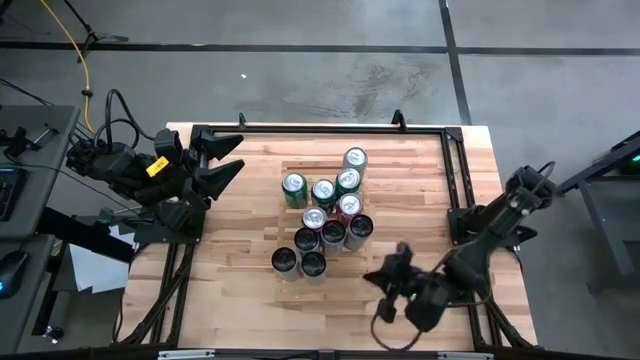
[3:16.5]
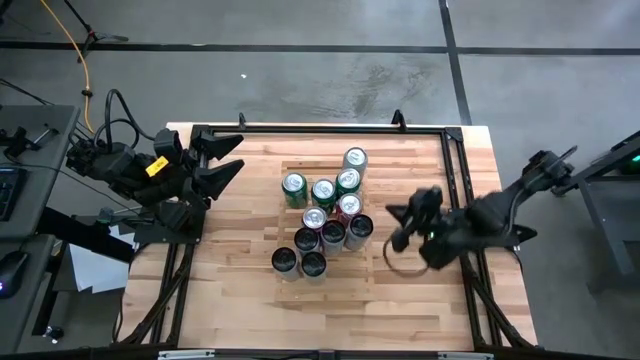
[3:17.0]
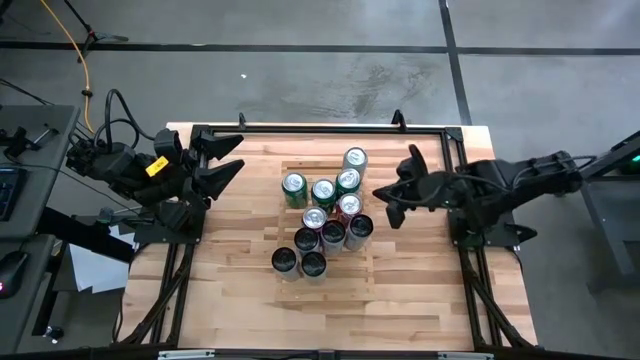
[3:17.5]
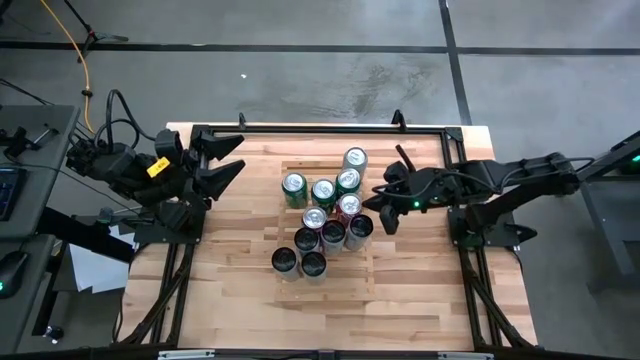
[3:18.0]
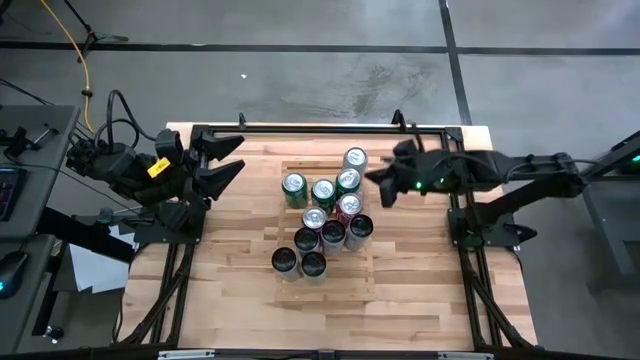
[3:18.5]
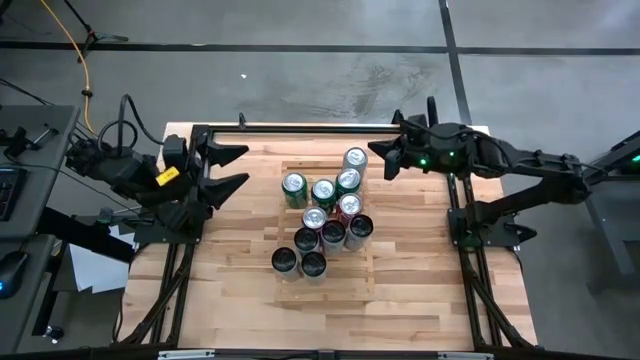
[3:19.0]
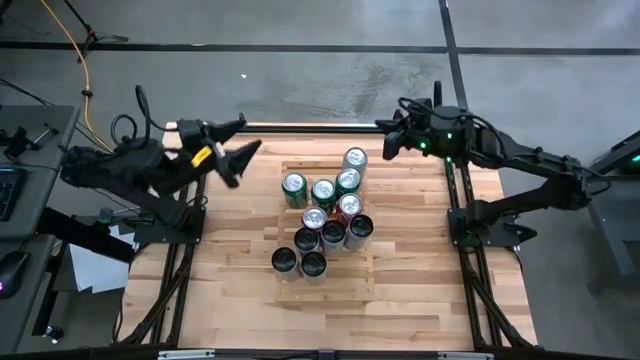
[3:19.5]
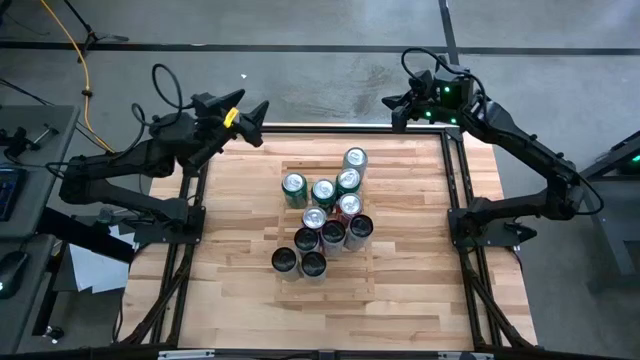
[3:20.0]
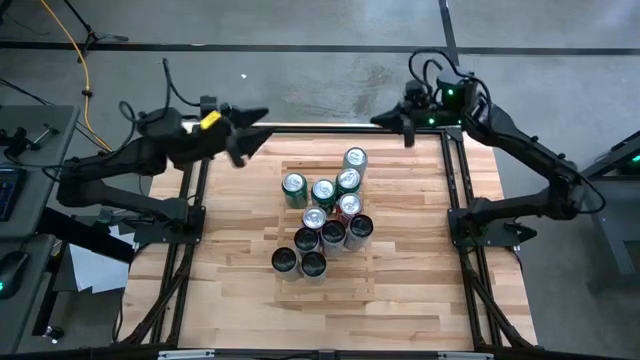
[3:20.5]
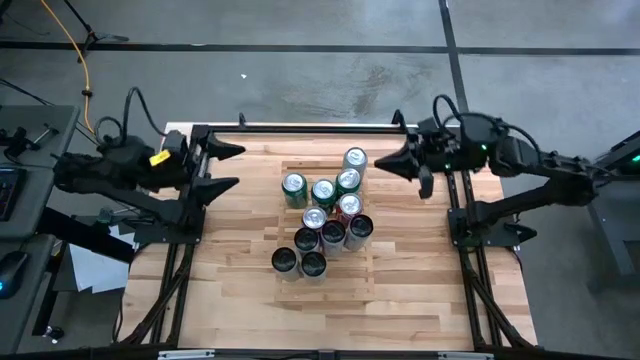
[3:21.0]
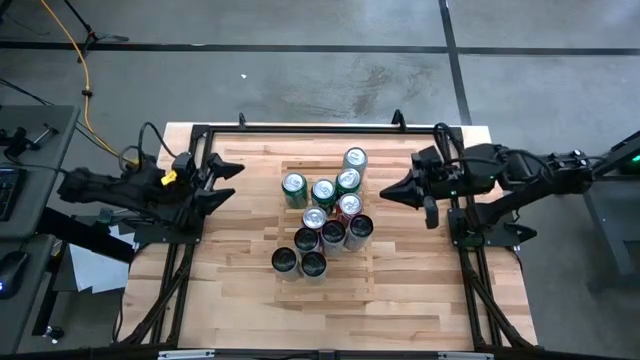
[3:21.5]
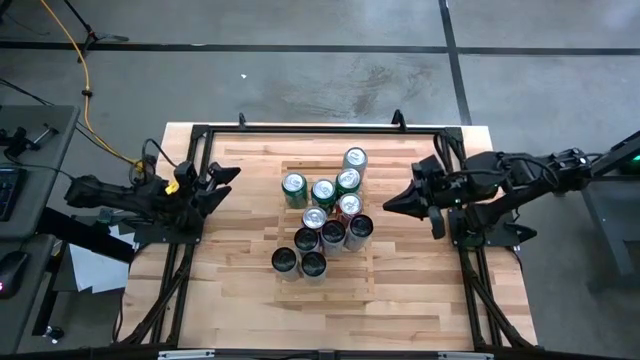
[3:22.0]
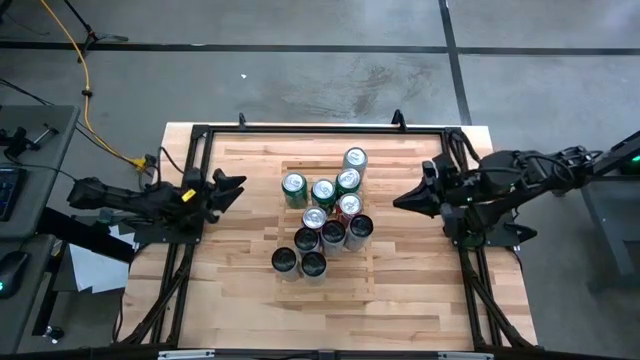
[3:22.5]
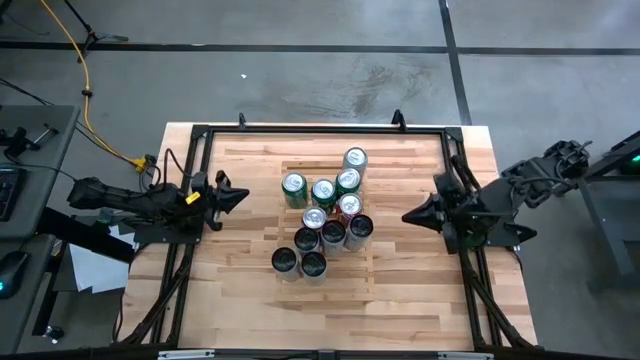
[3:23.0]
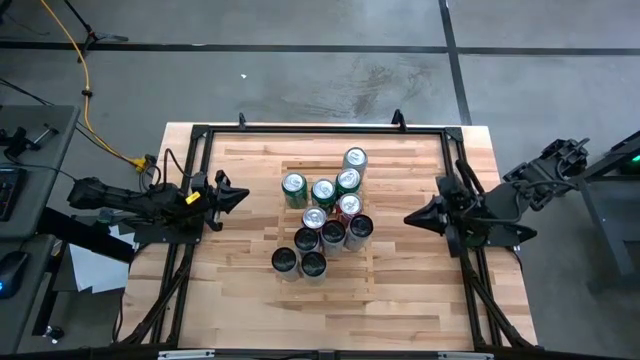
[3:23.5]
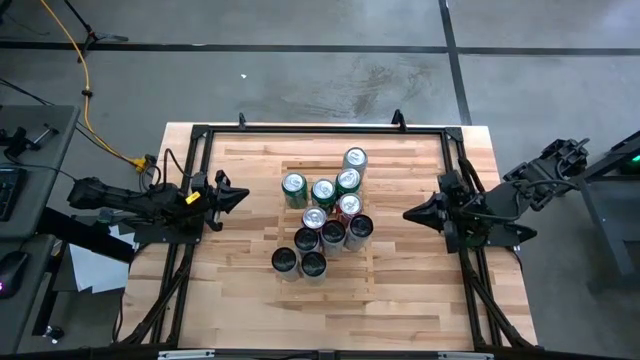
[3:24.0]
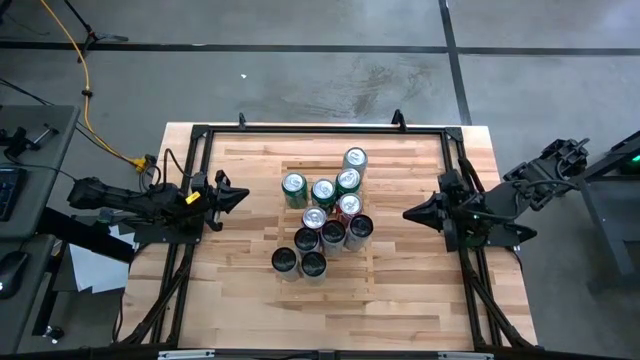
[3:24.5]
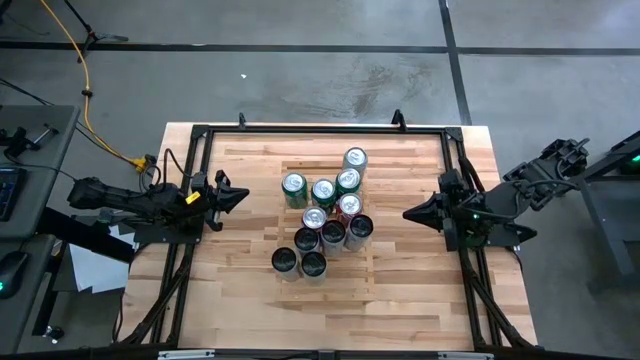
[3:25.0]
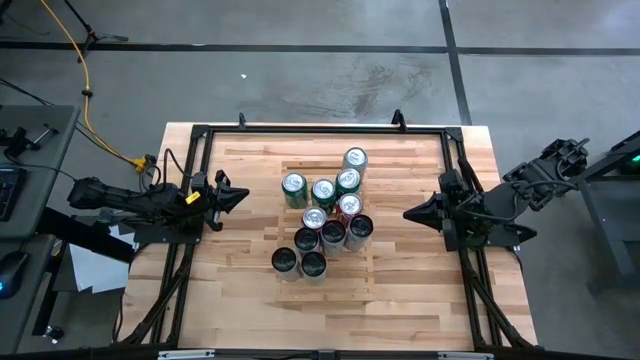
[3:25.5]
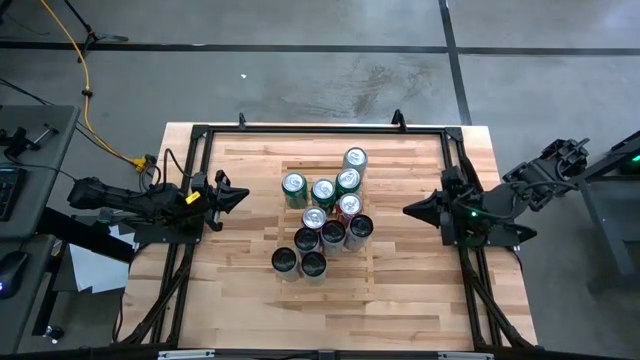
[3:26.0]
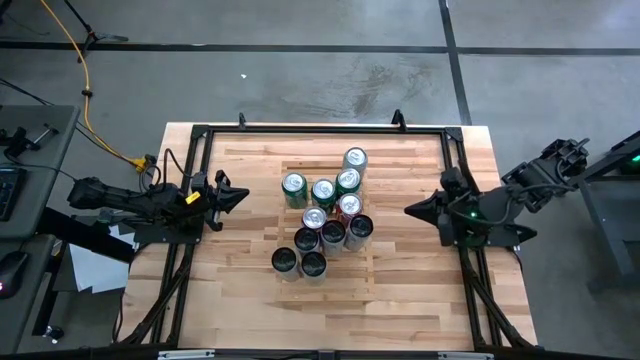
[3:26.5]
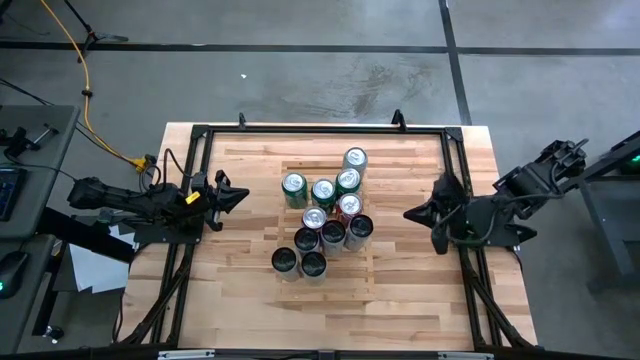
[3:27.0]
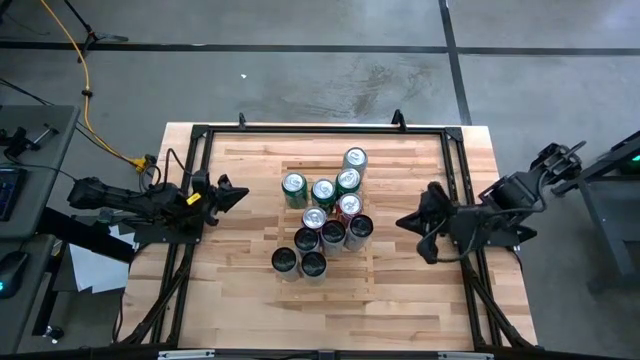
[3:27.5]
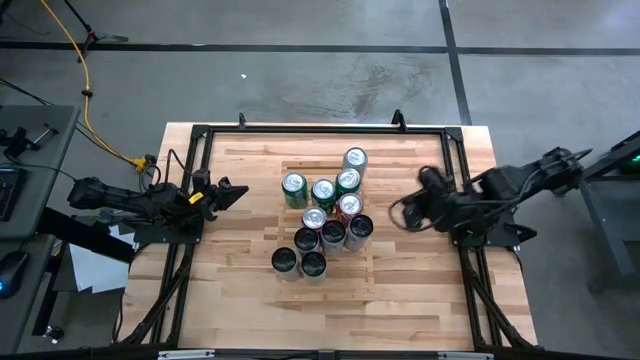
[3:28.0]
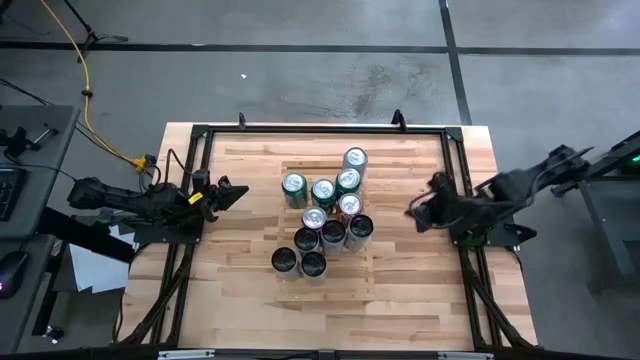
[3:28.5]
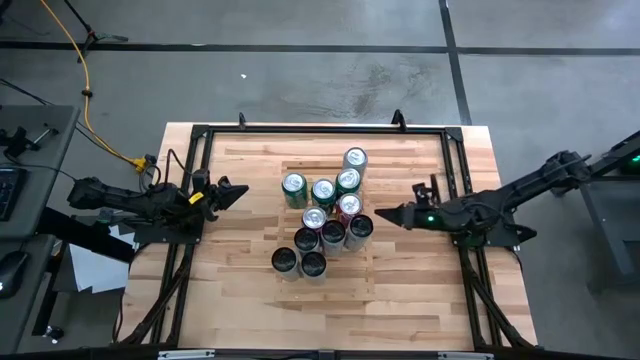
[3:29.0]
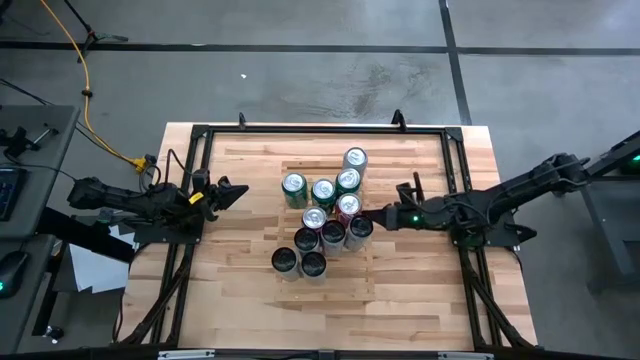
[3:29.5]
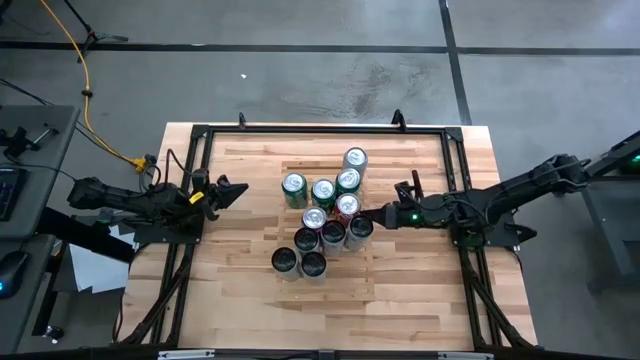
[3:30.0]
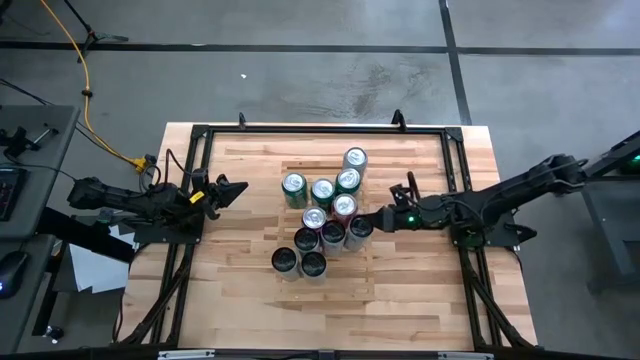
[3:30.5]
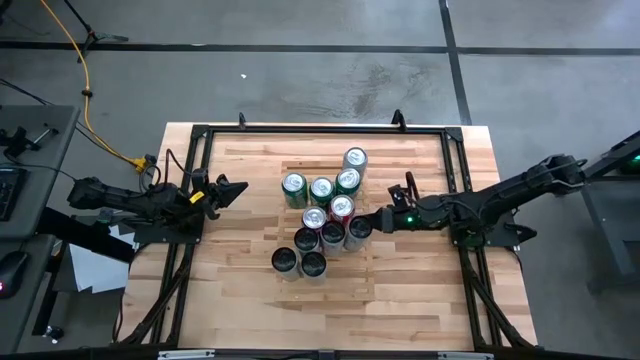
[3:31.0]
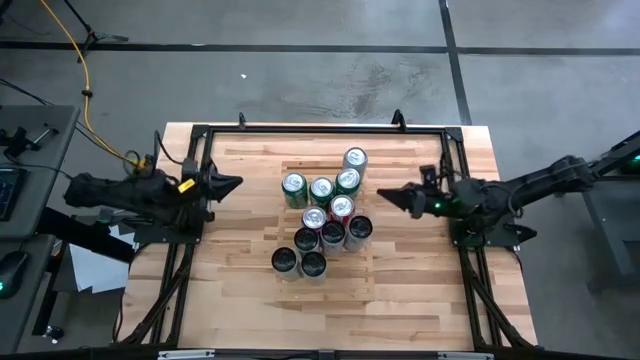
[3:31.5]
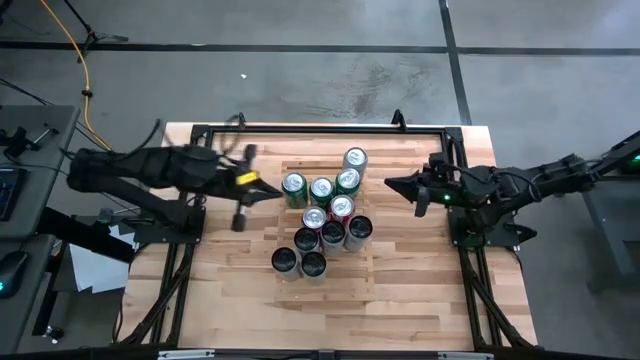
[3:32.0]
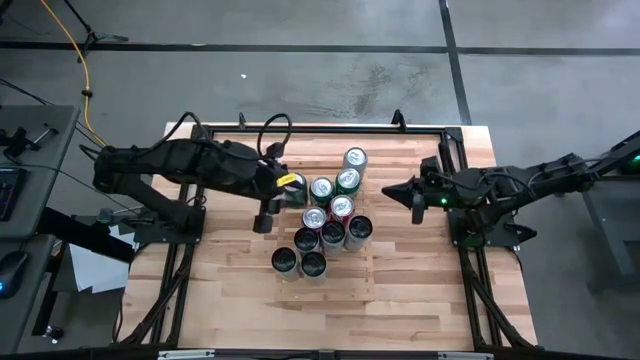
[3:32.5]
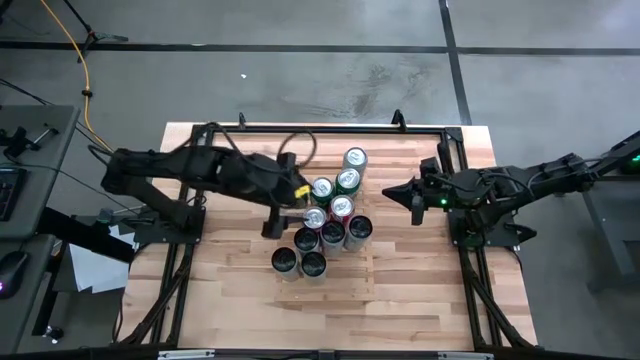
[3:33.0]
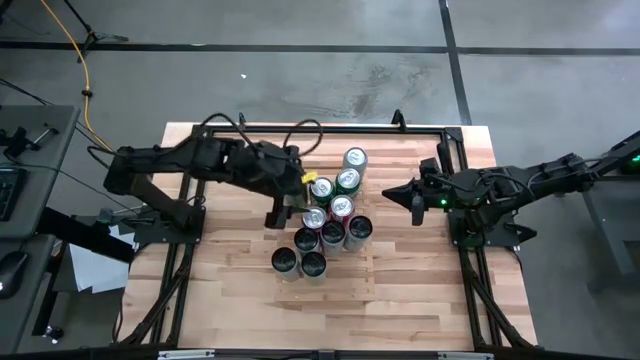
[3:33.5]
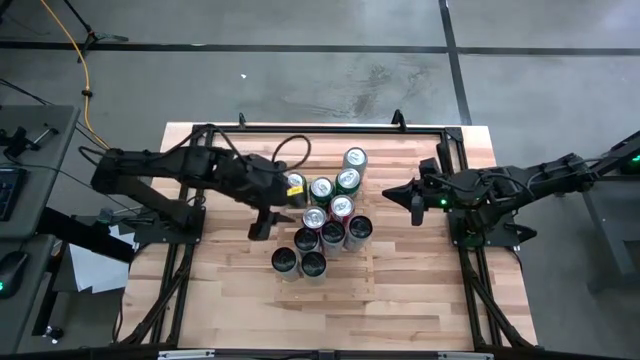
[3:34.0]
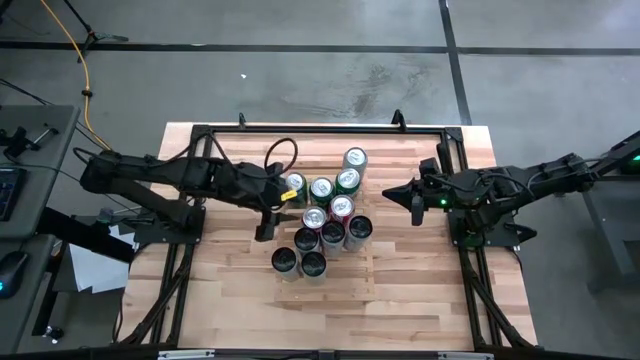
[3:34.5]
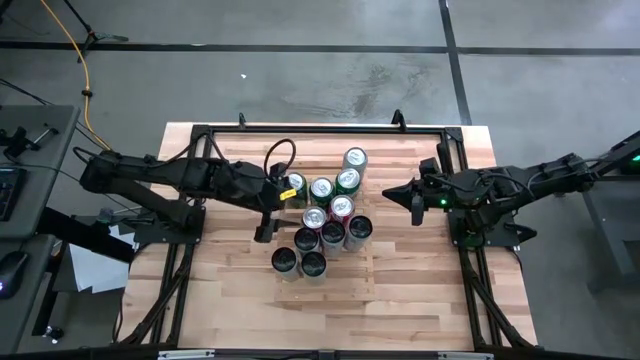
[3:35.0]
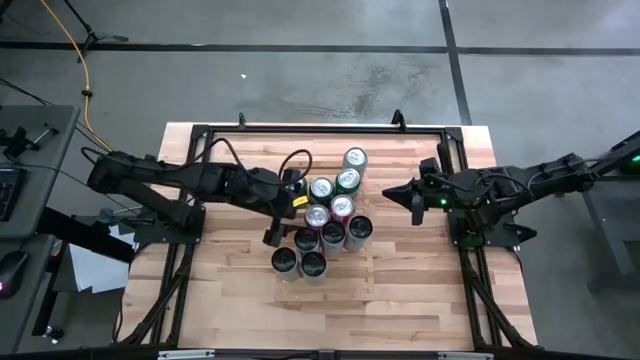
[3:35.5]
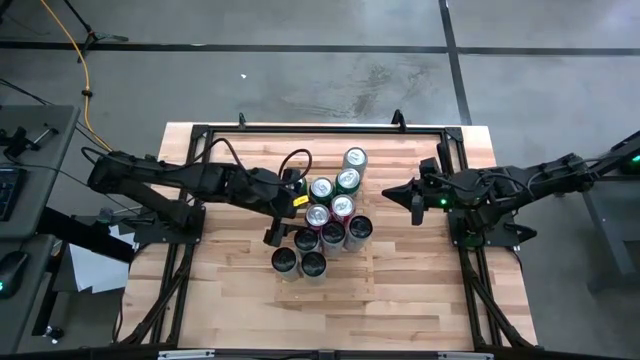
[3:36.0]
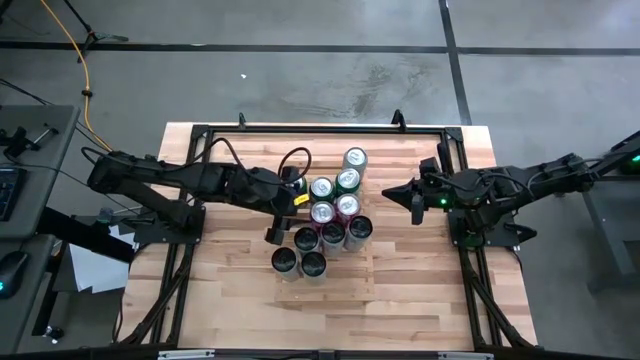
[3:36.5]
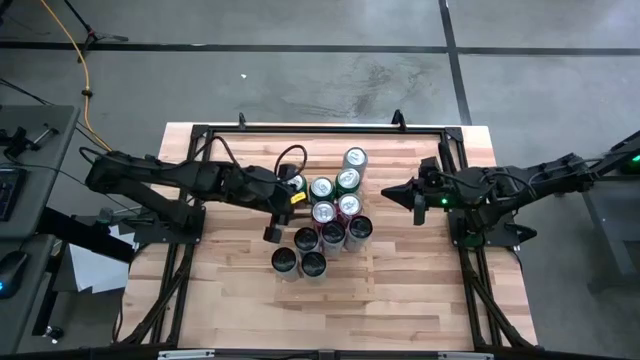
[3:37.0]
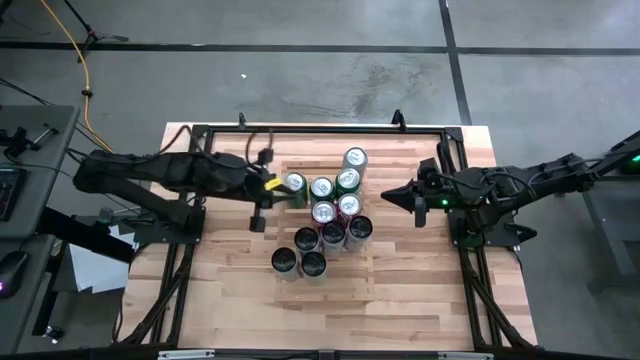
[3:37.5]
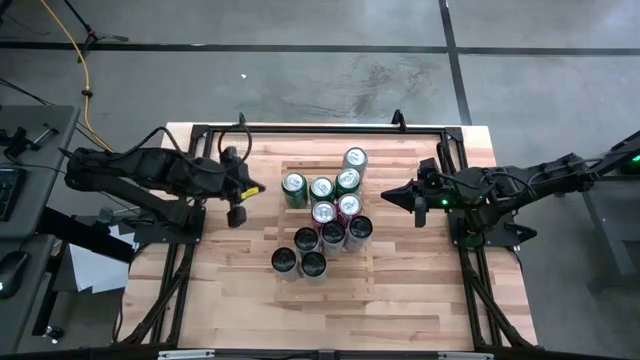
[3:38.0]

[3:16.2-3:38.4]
Task: Place canned beverage on shelf
Adjust the soda cans
